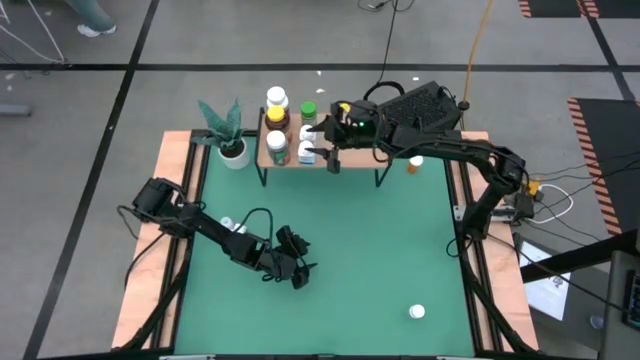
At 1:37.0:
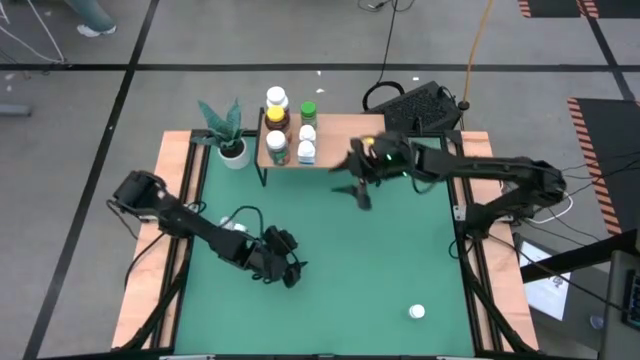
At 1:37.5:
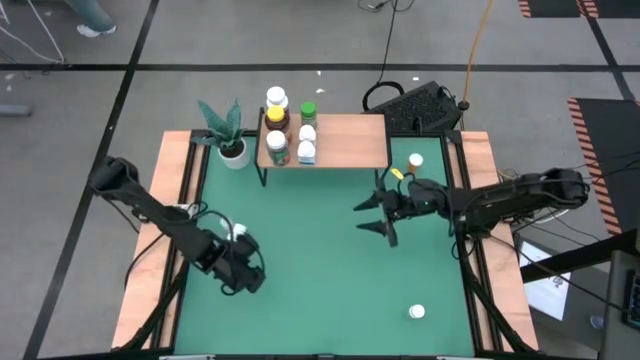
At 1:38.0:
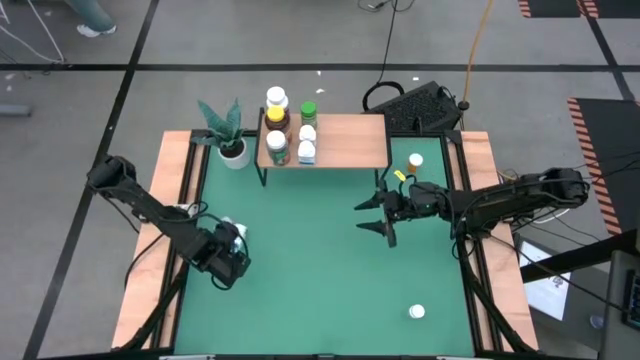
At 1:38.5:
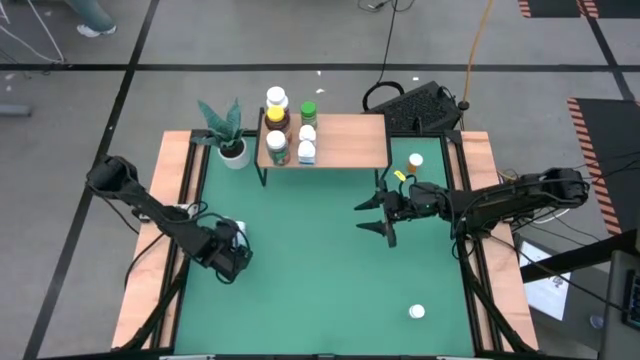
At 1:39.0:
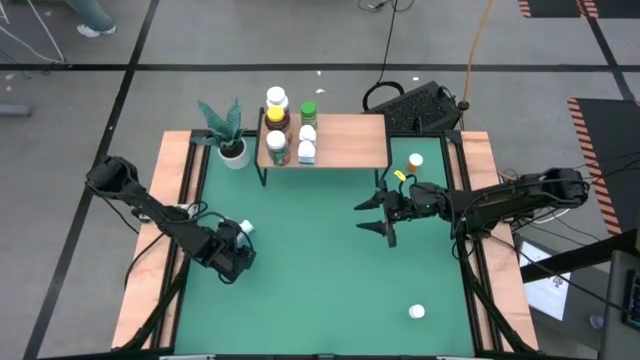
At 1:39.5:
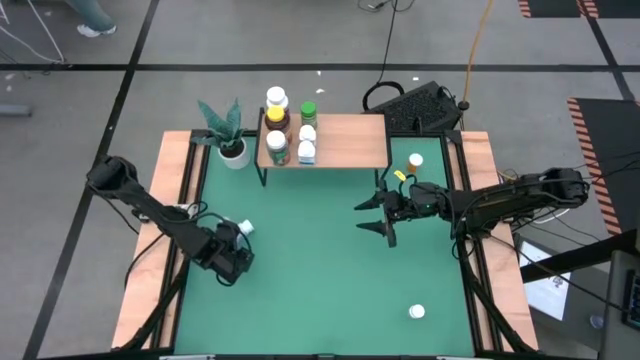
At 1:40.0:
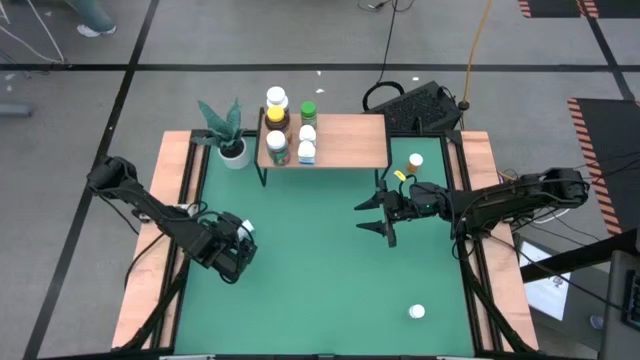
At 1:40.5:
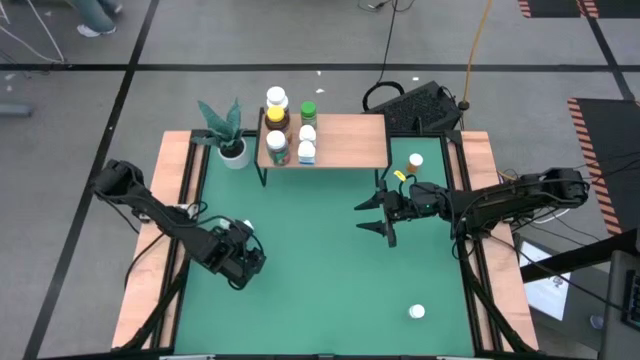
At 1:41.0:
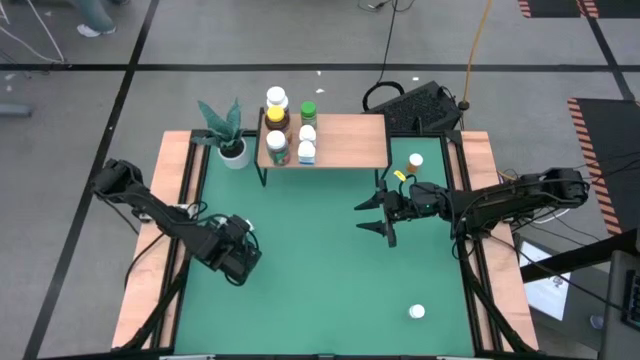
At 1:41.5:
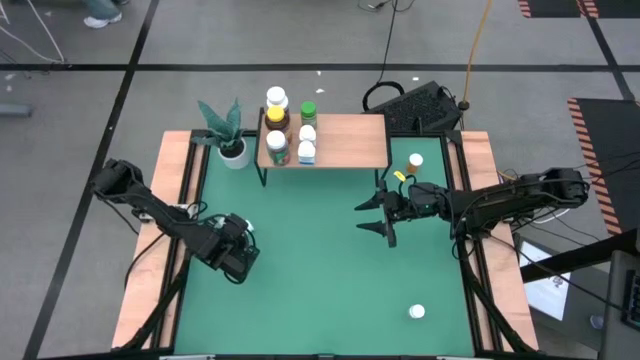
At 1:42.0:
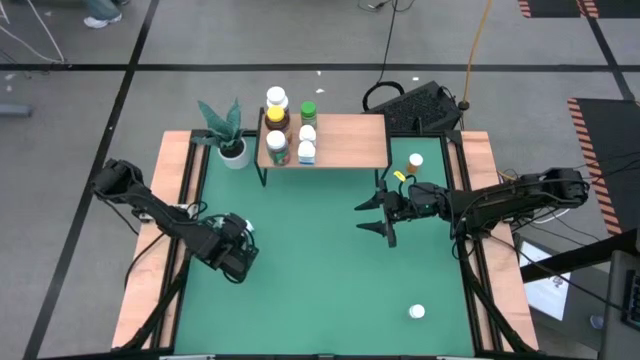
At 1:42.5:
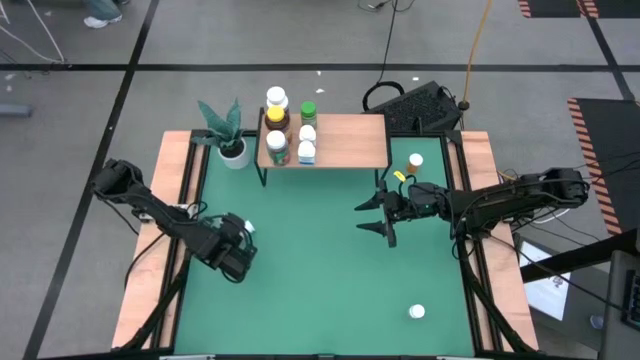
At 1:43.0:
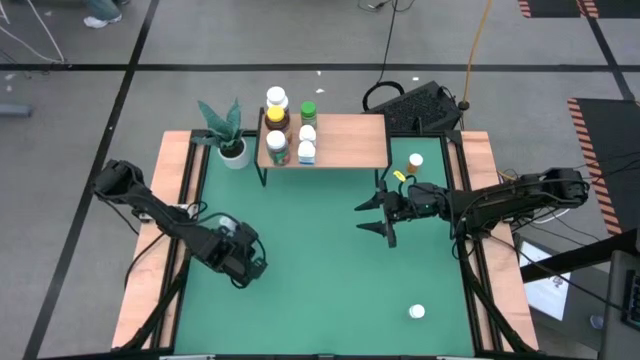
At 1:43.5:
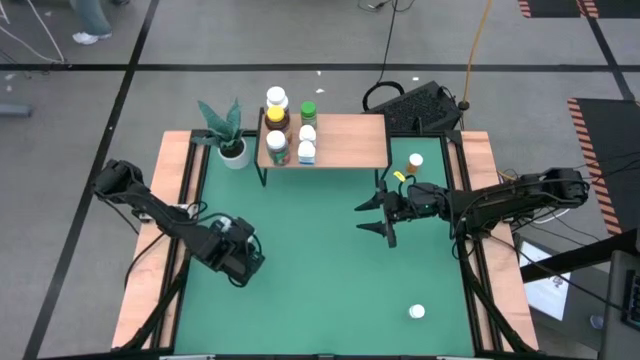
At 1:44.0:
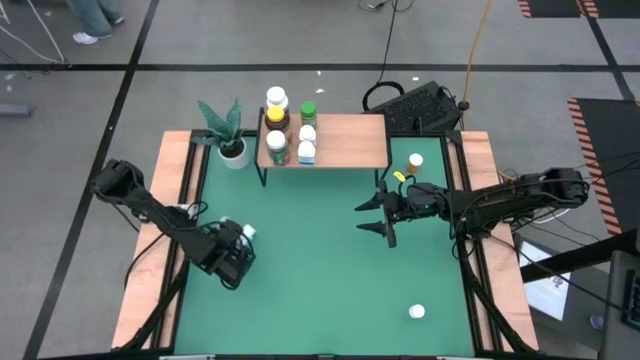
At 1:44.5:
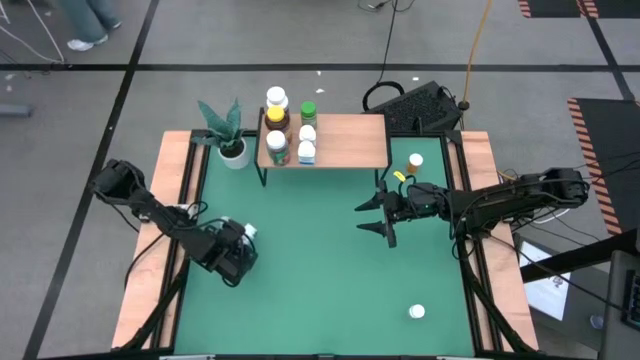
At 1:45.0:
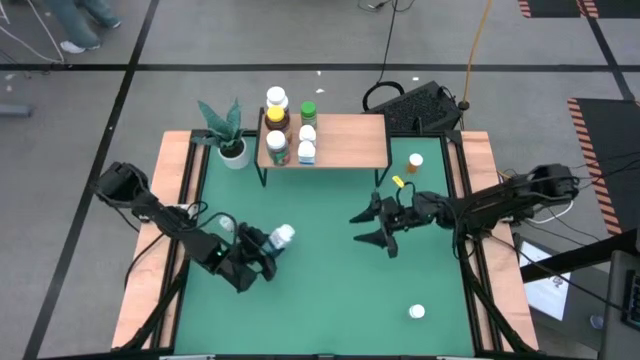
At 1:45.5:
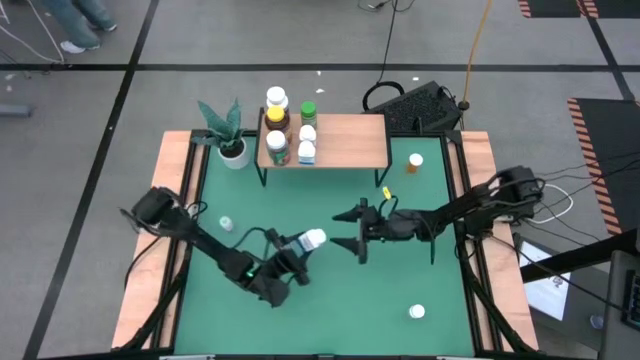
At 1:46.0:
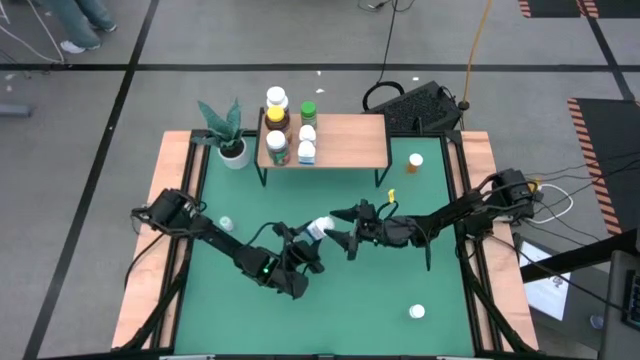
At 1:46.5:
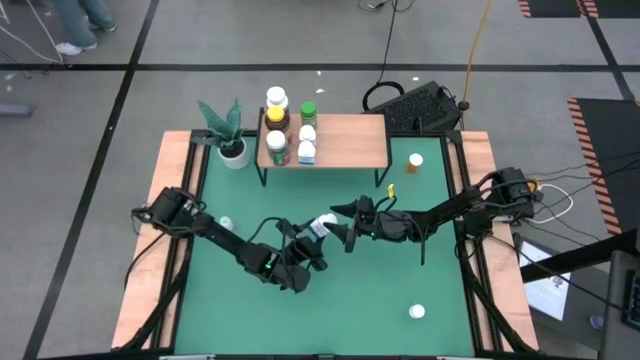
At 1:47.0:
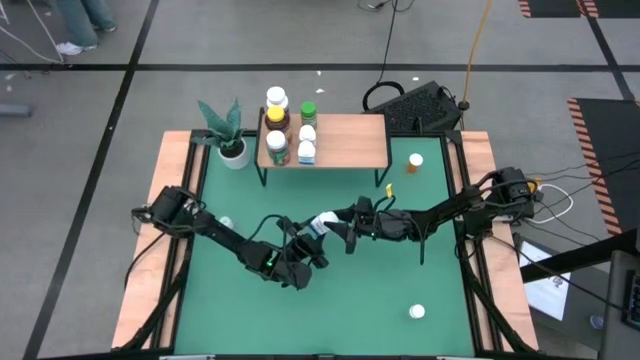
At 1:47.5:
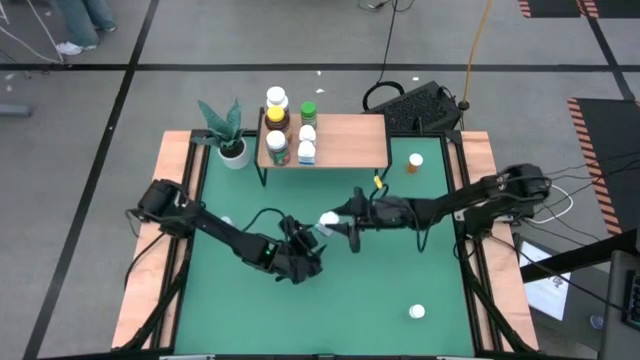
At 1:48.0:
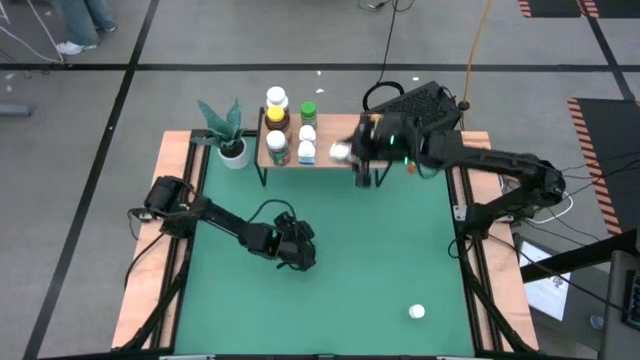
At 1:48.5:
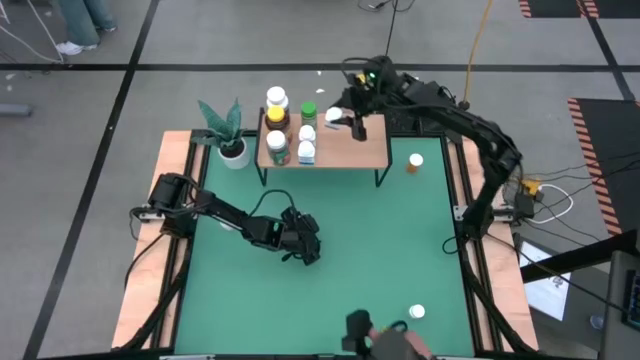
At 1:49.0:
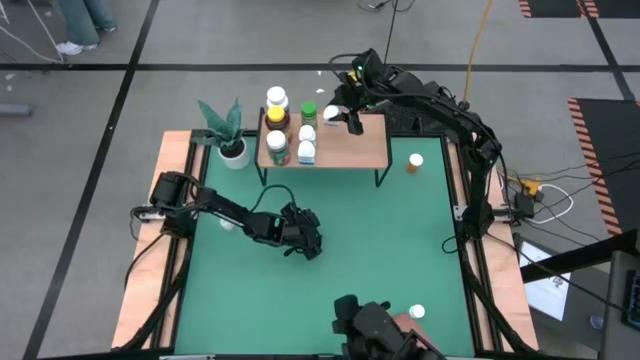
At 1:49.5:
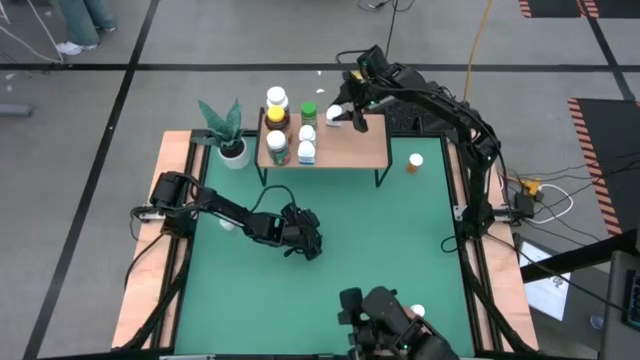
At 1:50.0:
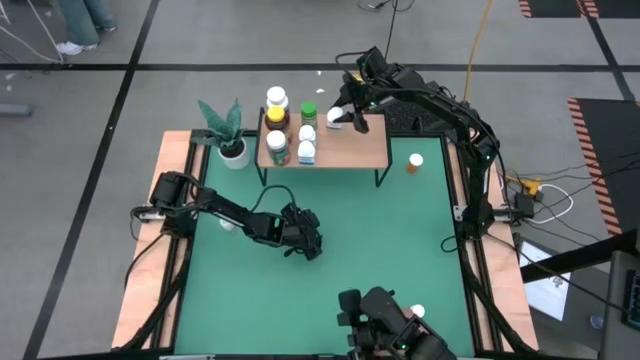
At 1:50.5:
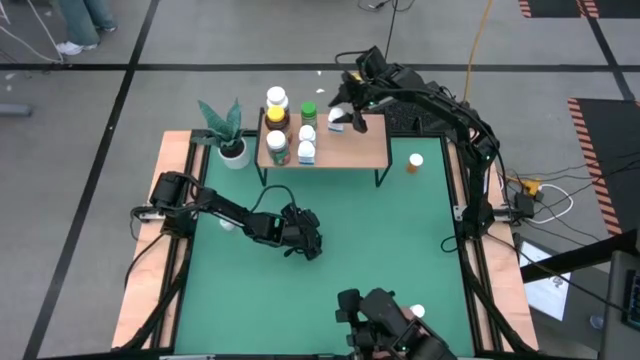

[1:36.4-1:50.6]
Task: Pick and place medicine bottles onto shelf by color
Put the white blue pill bottle on the shelf

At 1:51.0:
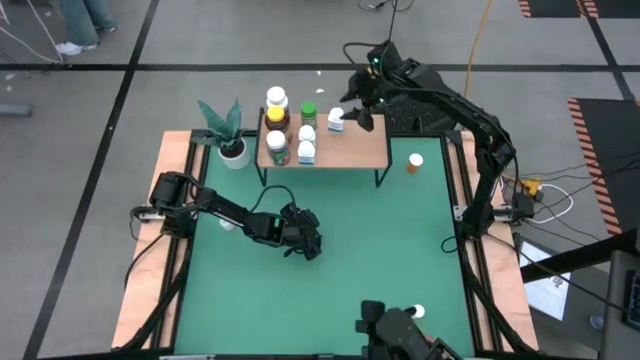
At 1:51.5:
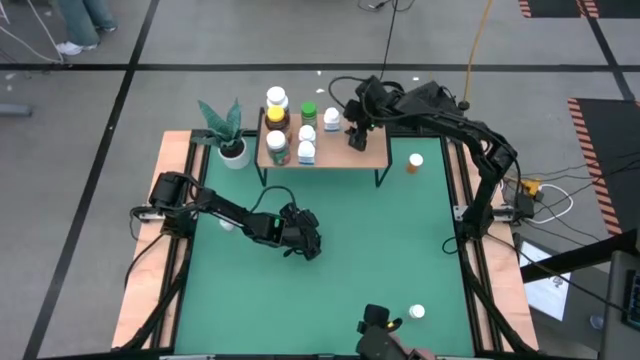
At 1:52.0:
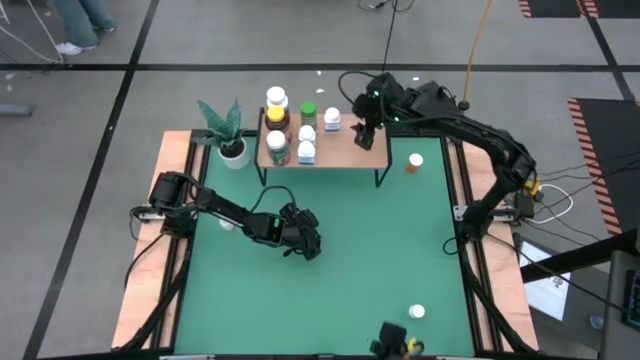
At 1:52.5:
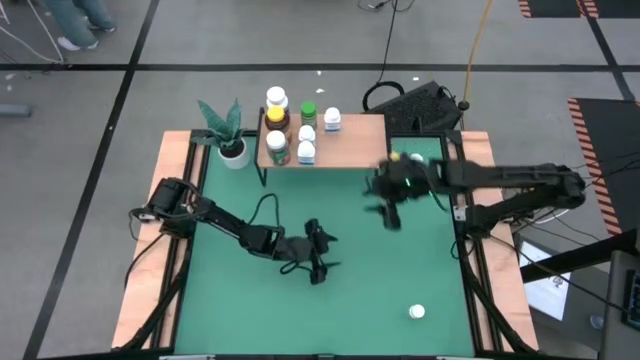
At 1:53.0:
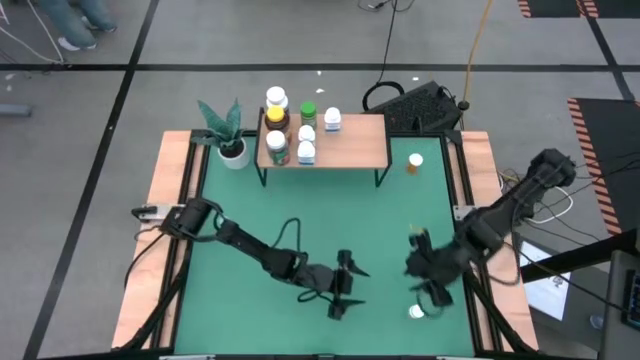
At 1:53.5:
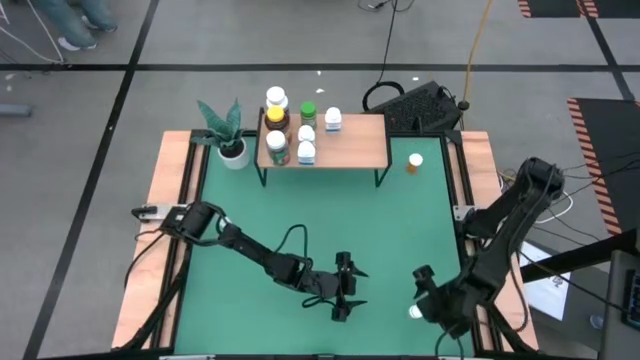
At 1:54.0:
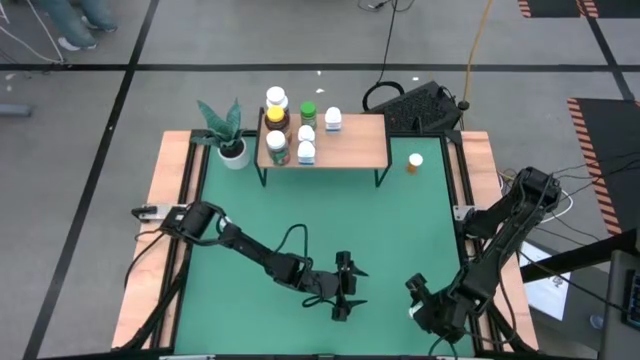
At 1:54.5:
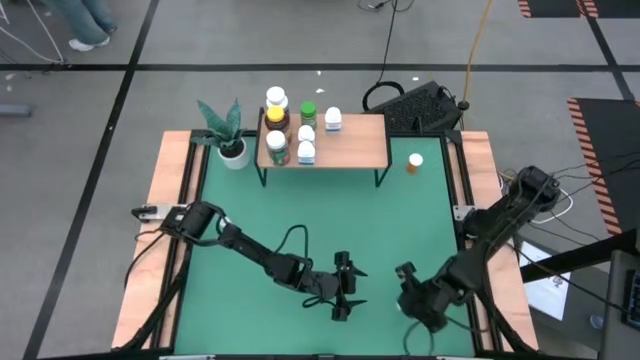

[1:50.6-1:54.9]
Put the white black pill bottle on the shelf aligned with the white blue medicine bottle

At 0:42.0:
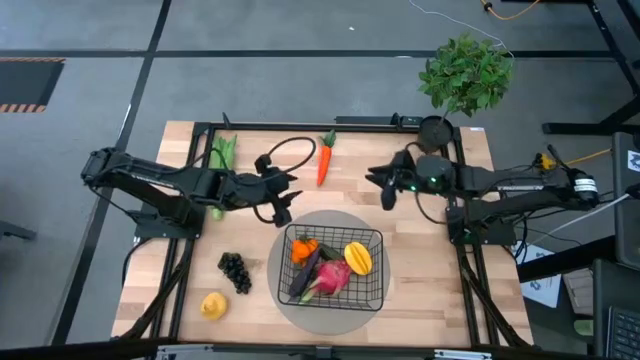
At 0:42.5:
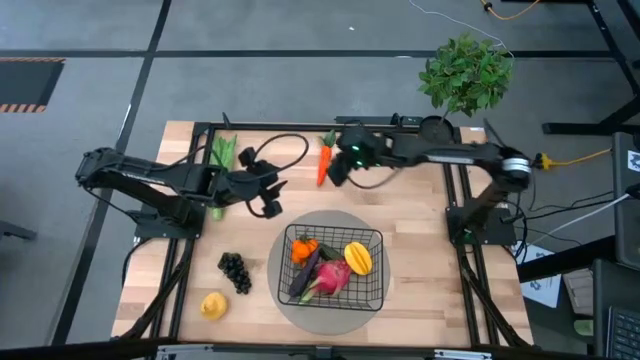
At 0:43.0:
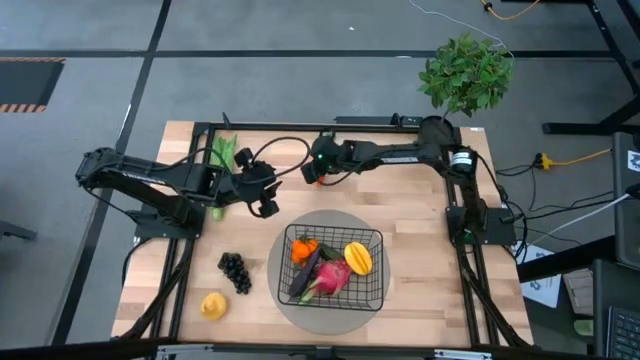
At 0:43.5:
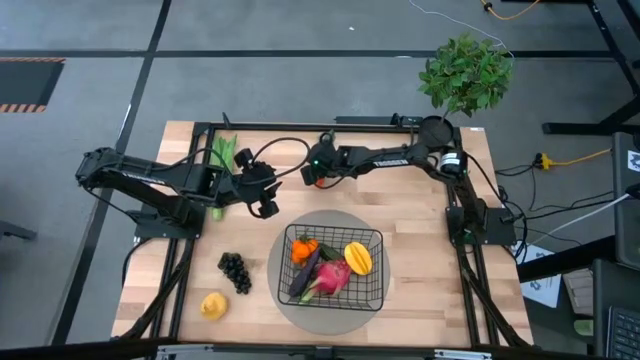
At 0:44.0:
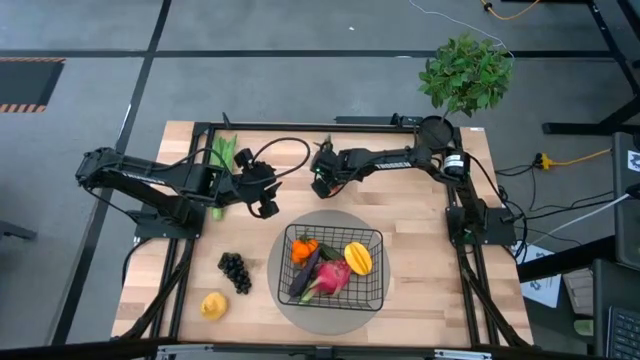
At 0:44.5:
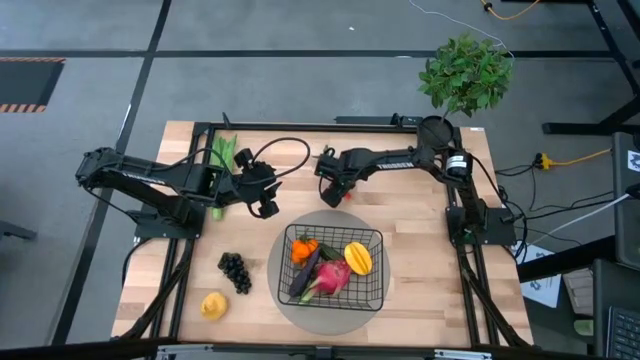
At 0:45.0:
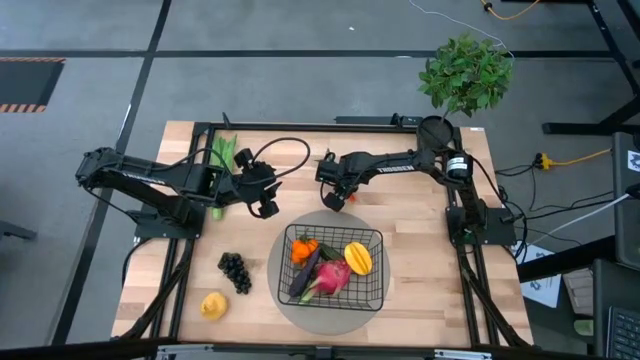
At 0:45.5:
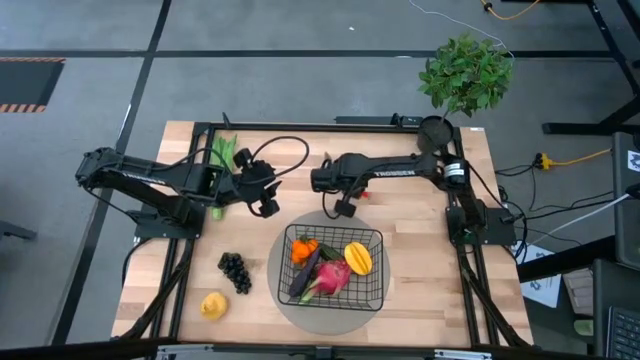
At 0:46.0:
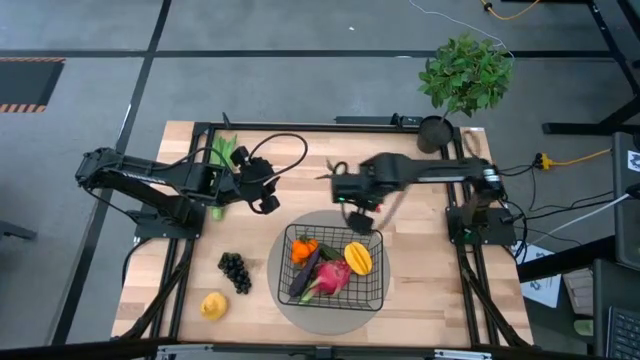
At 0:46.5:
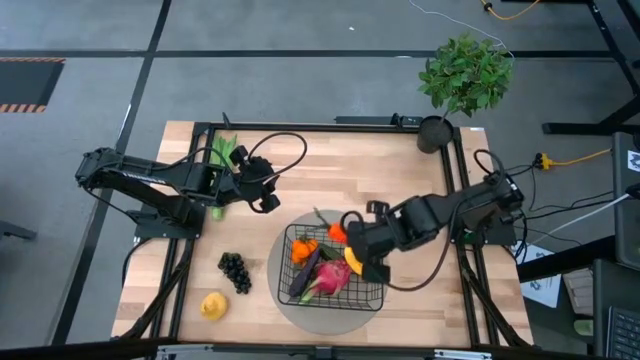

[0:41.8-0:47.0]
Task: Build produce basket
Put the orange carrot into the black wire basket
